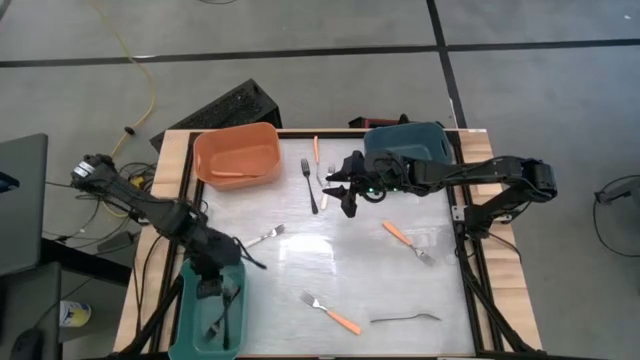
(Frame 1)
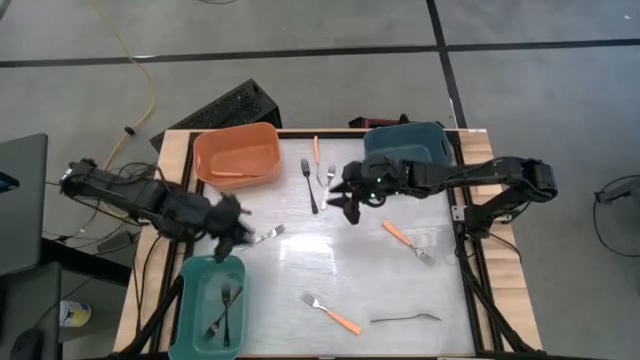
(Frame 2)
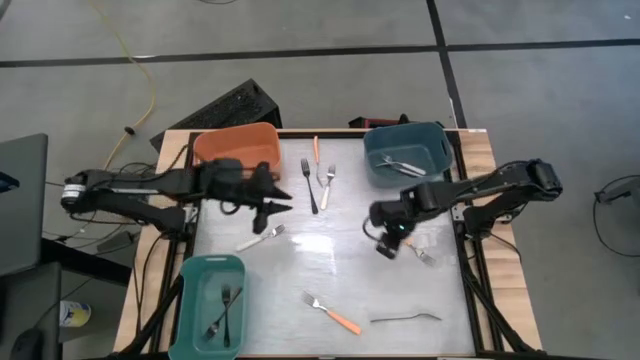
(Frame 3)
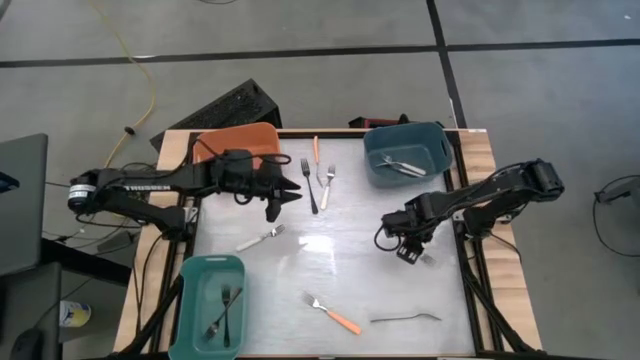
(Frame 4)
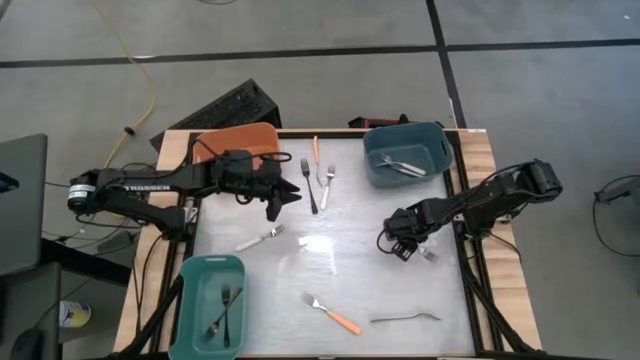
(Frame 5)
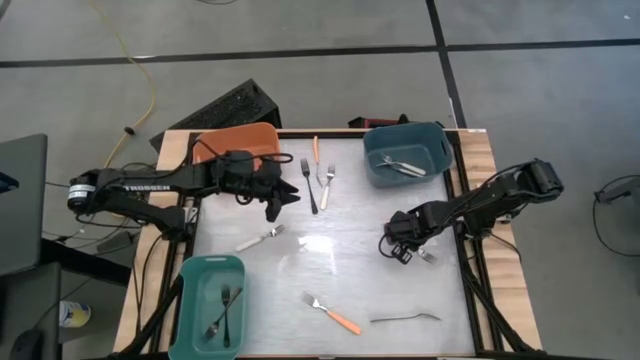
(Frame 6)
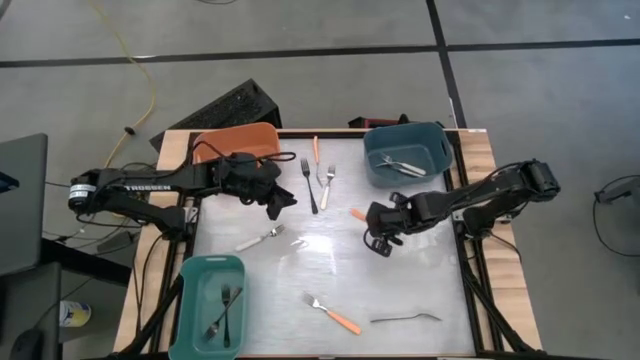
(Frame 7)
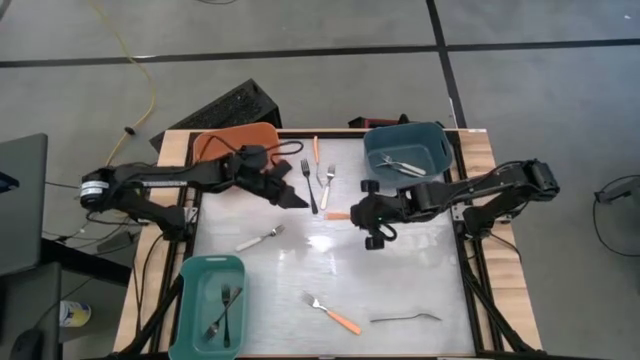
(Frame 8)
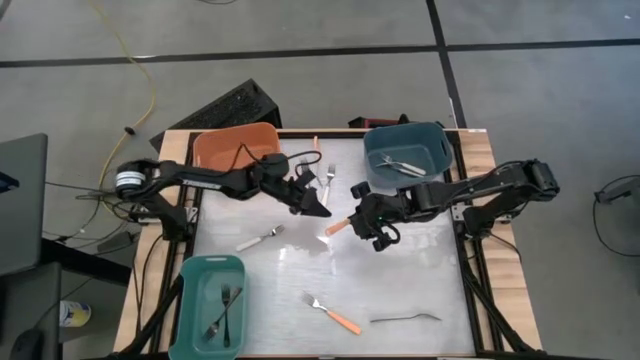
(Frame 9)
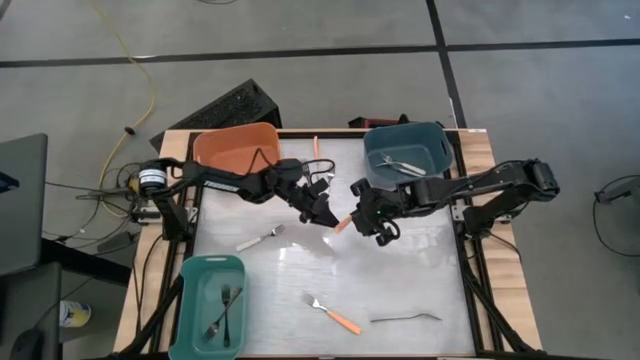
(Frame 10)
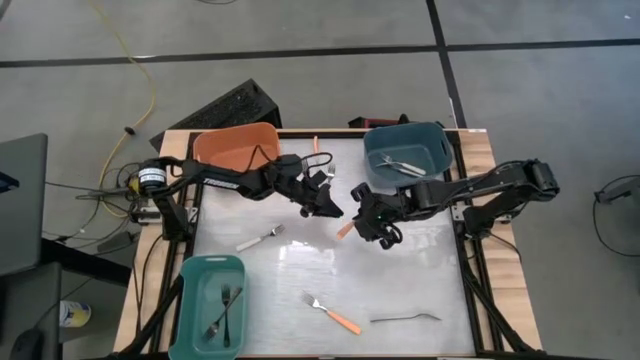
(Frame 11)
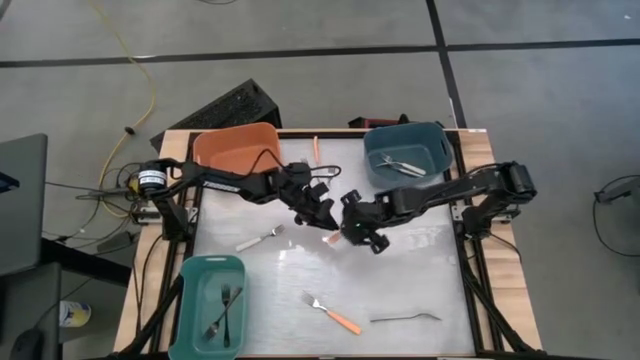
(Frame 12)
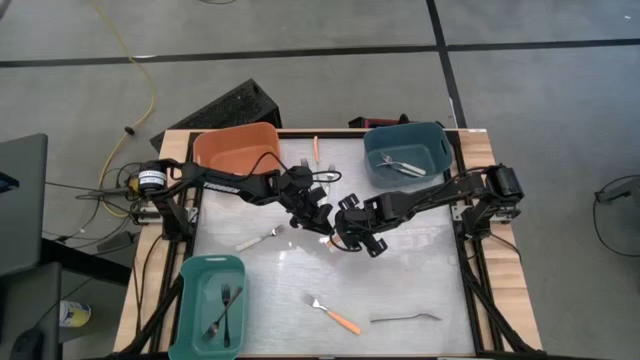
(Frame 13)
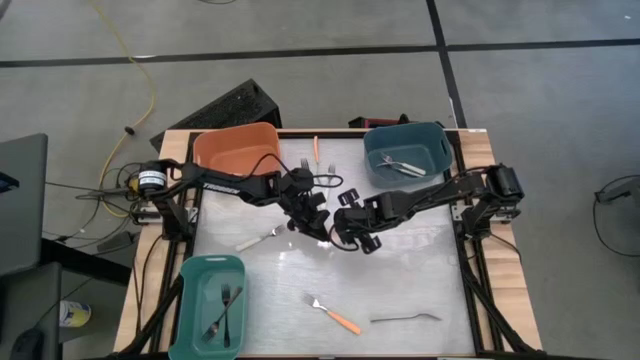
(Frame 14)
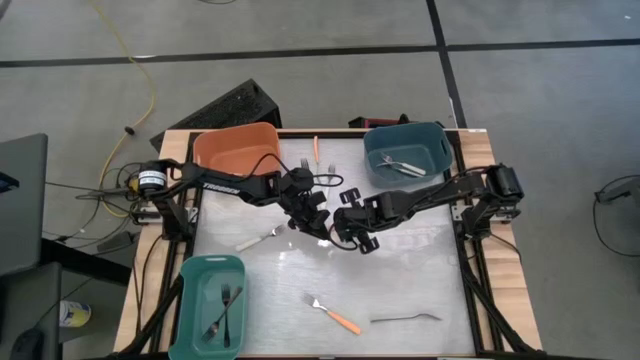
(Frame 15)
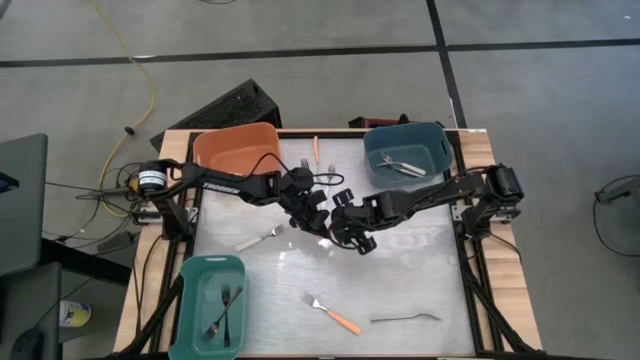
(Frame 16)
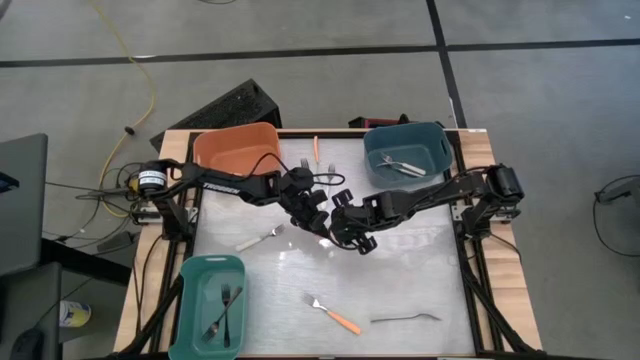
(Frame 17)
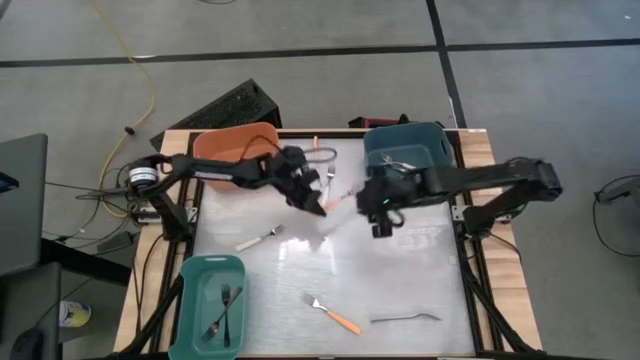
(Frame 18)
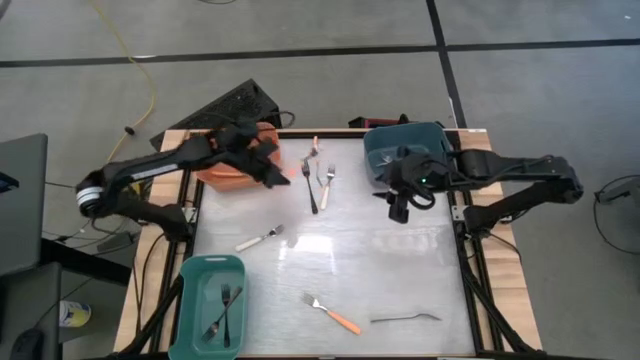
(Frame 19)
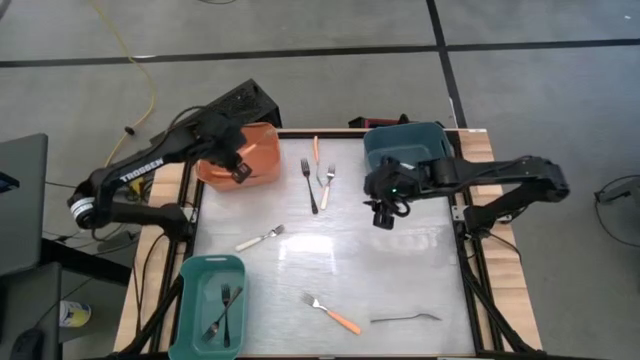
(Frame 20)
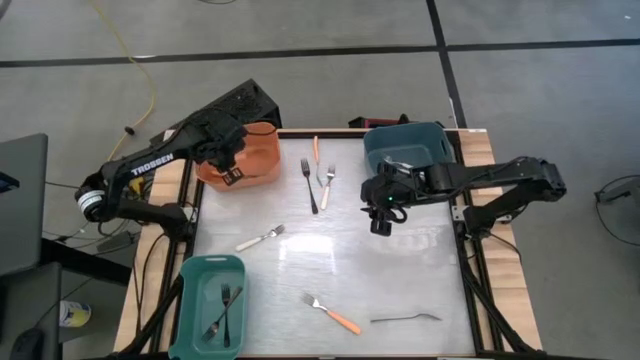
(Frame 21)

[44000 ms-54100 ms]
Task: Sort silverware by color (type)
Put the orange fork into the orange bin

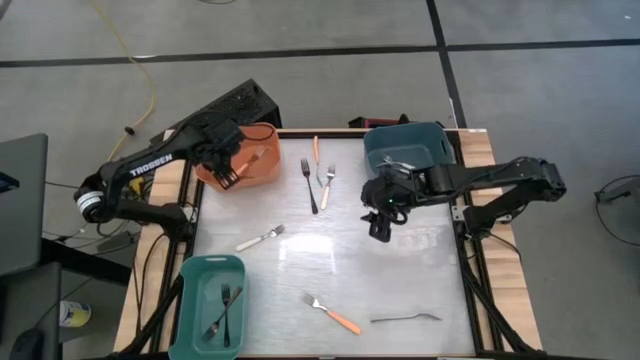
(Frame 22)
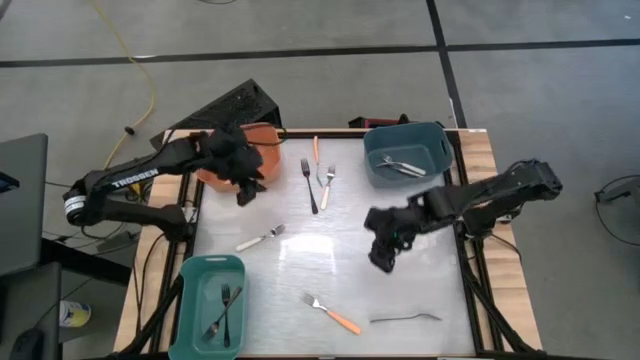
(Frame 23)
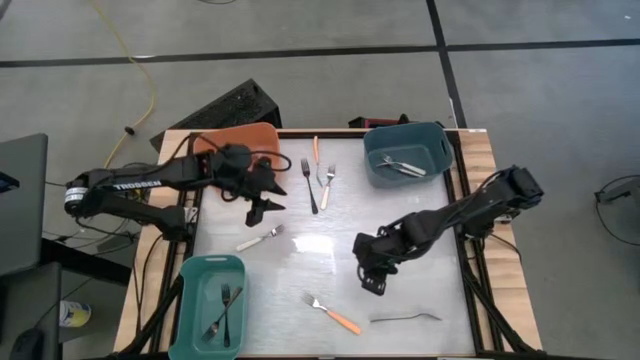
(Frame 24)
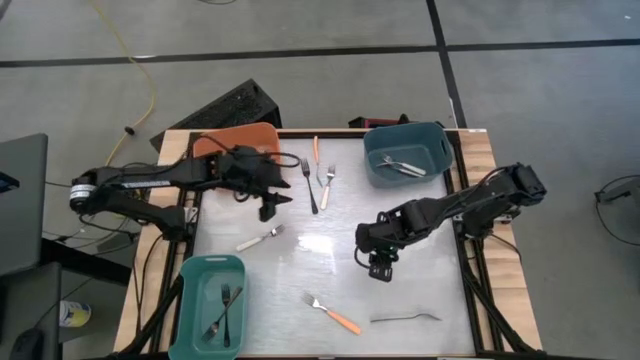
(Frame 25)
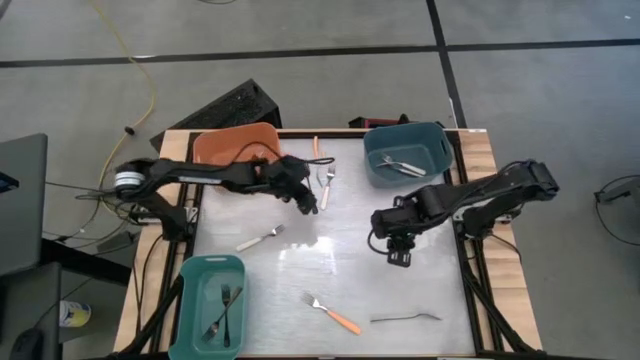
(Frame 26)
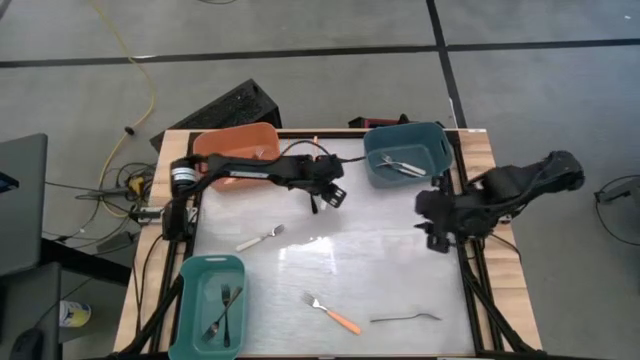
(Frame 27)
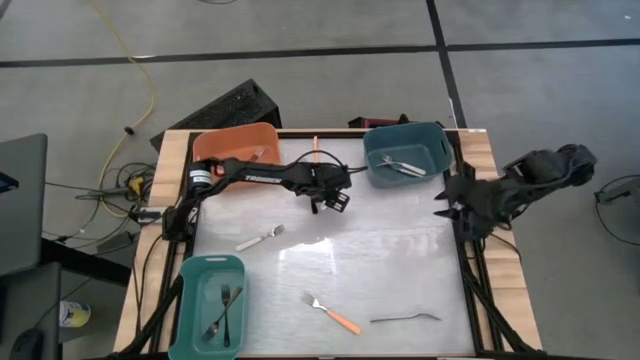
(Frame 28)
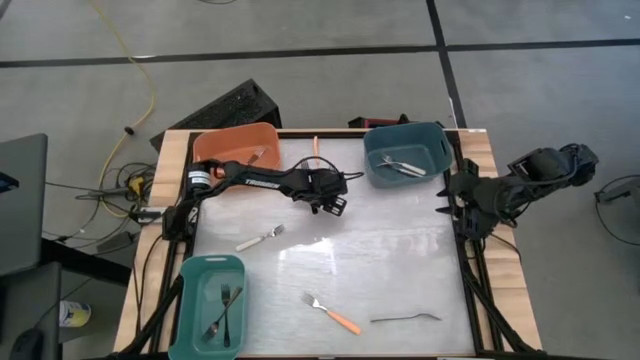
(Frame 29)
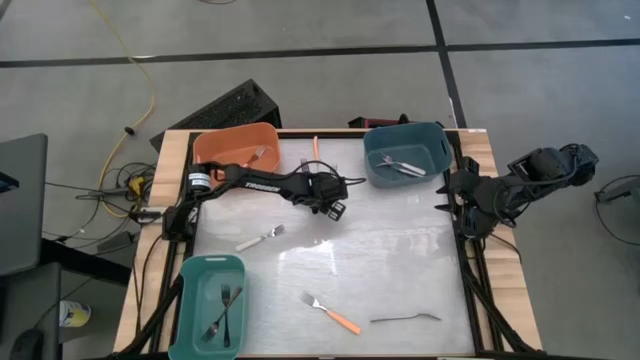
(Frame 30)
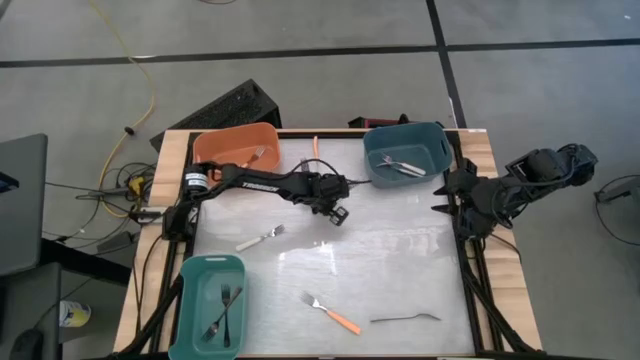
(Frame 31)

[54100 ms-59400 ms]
Put the white fork into the blue bin

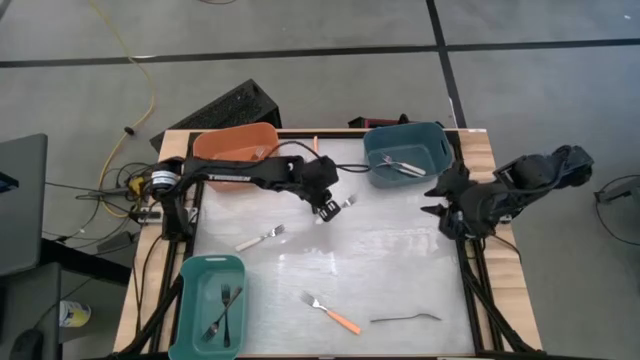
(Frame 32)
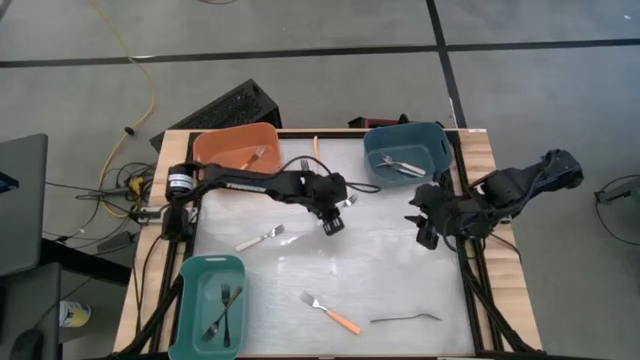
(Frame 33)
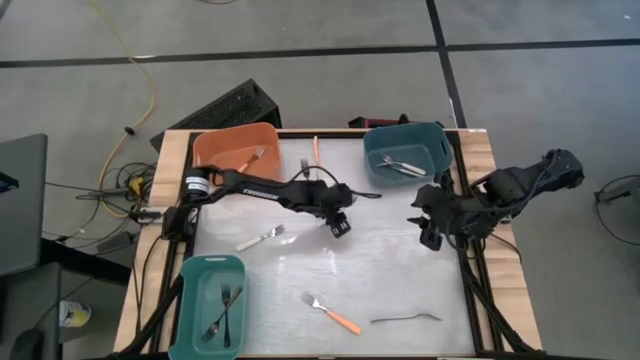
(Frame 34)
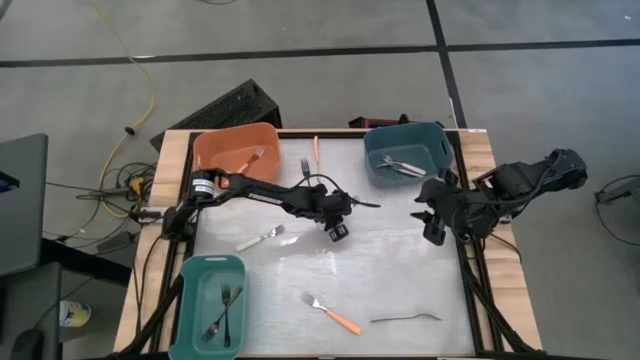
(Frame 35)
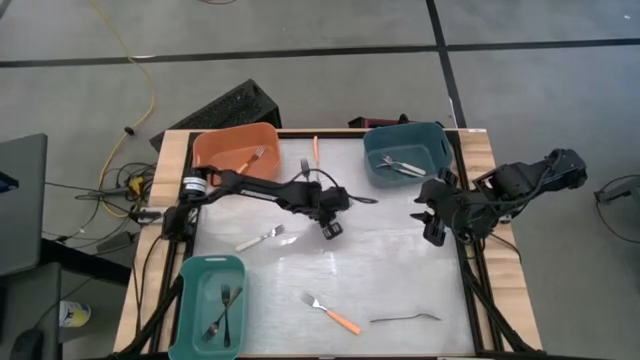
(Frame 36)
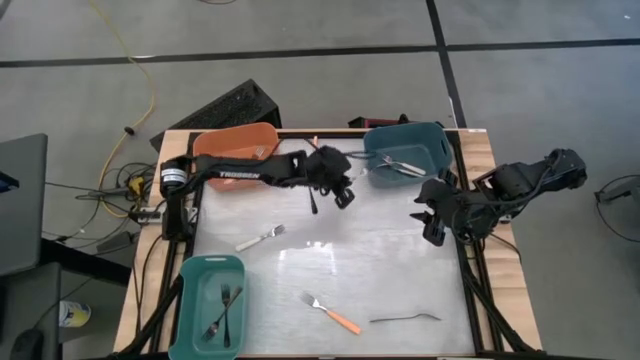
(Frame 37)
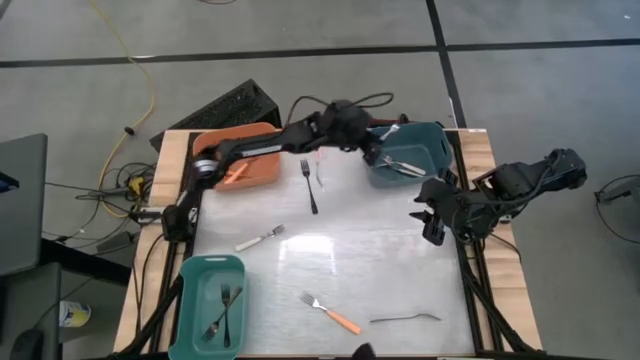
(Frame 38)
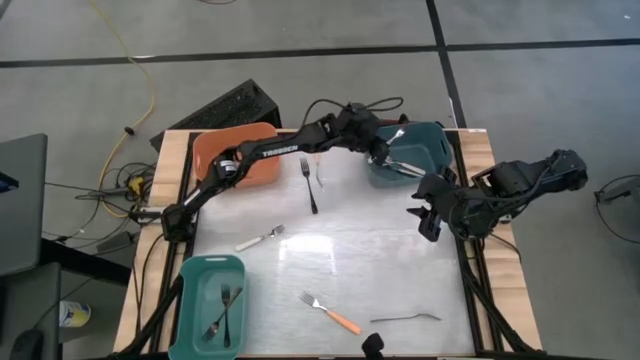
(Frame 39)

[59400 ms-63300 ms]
Put the white fork into the blue bin

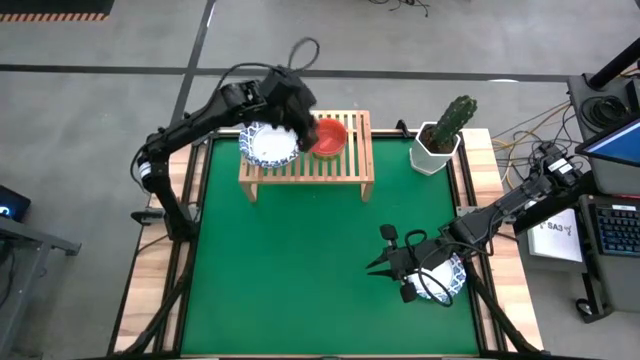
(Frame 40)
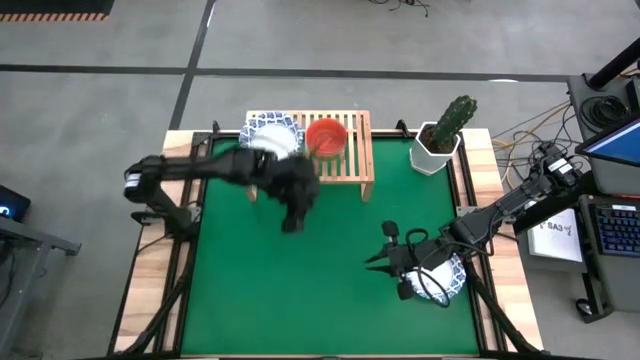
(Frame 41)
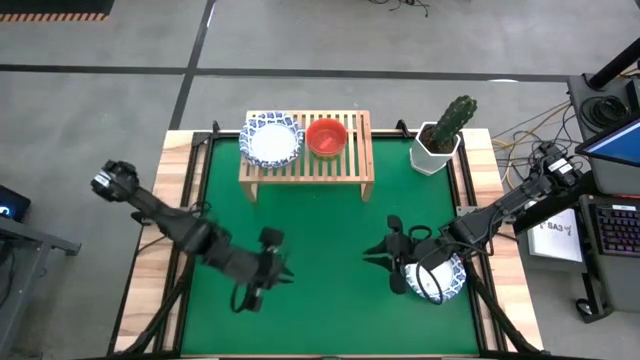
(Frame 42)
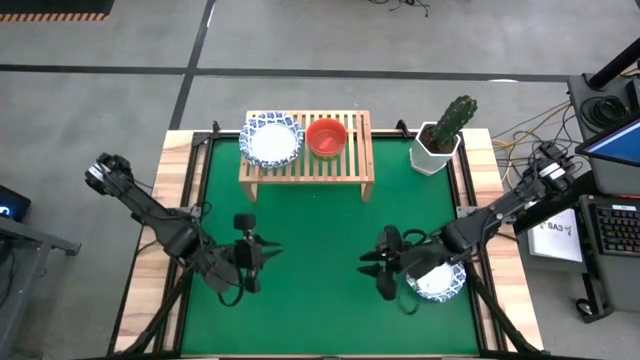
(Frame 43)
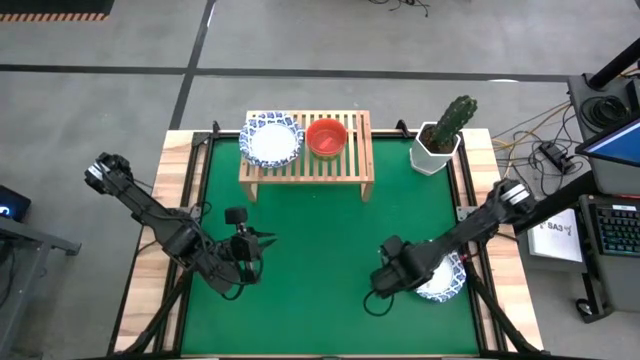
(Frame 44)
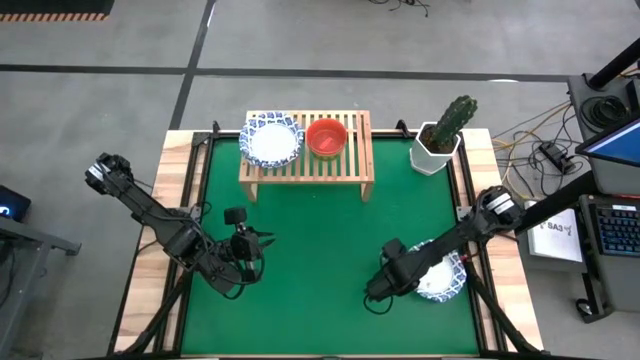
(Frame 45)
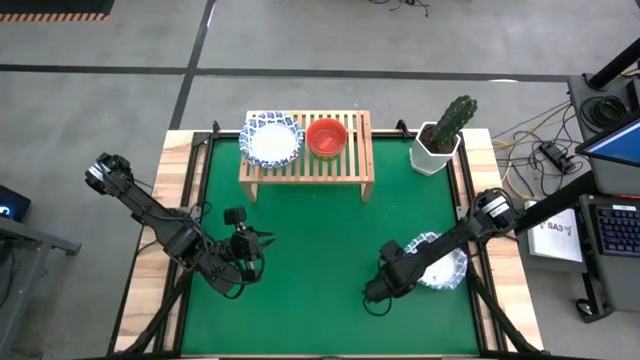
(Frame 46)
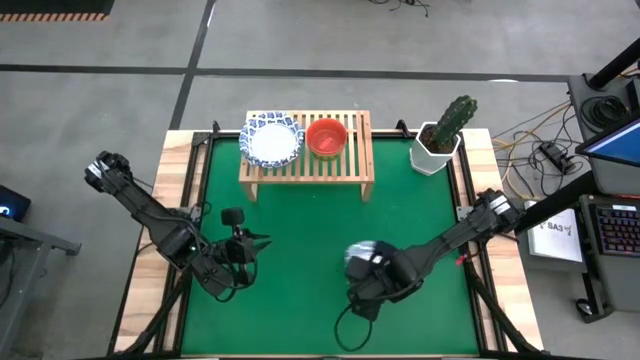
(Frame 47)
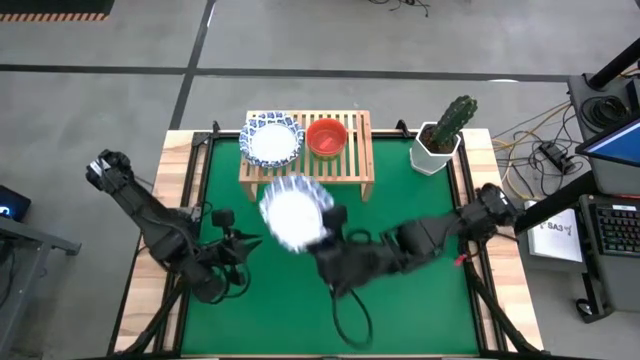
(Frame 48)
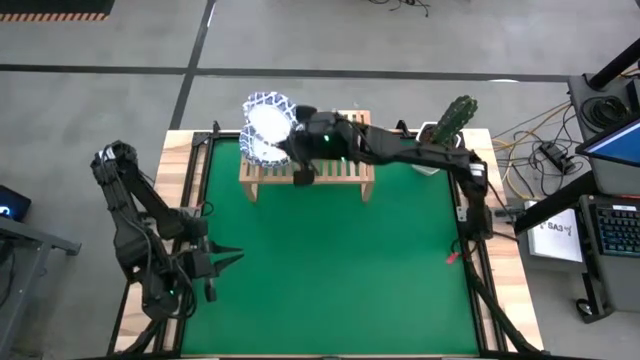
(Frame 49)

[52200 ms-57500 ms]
Task: Place and stack bowls onto a shelf
Stack the large blue patterned on top of the large blue patterned bowl on the shelf
